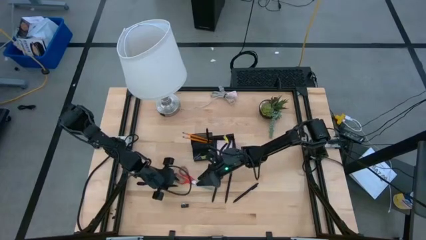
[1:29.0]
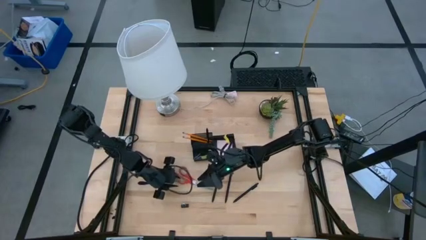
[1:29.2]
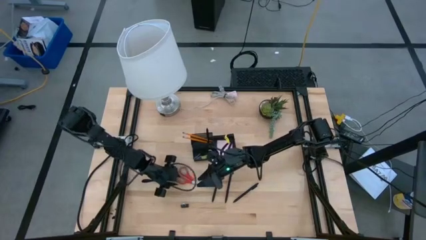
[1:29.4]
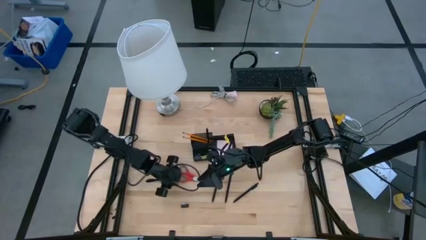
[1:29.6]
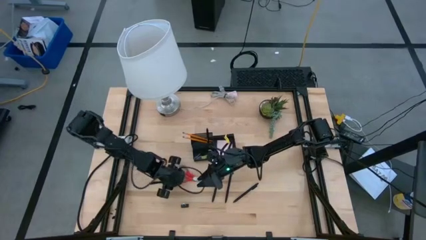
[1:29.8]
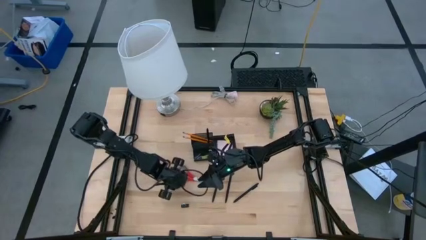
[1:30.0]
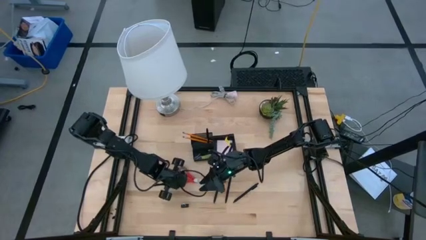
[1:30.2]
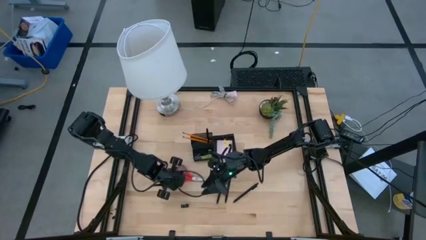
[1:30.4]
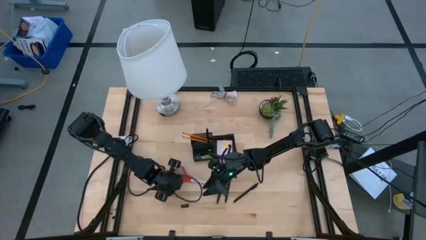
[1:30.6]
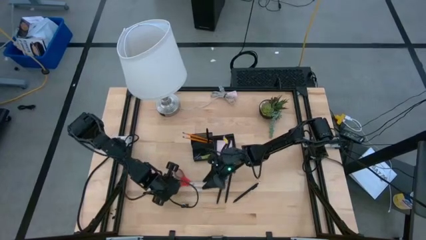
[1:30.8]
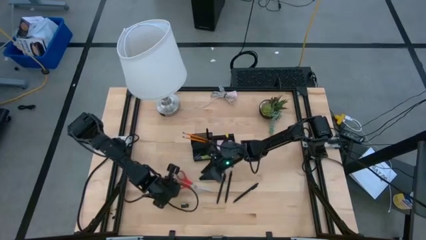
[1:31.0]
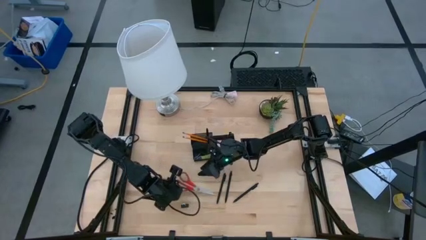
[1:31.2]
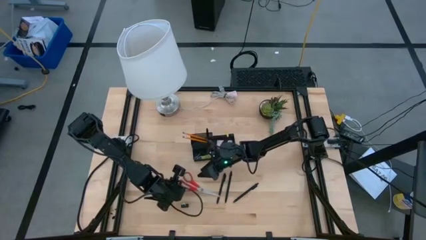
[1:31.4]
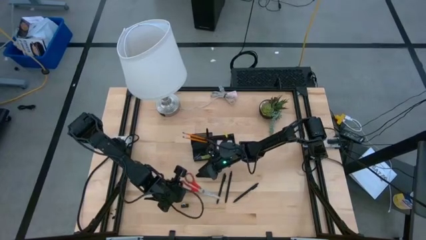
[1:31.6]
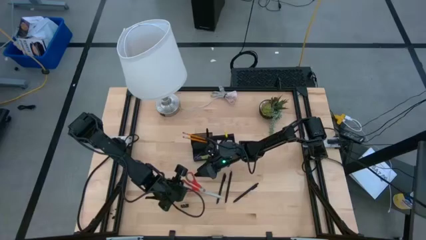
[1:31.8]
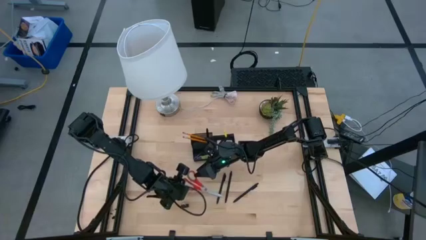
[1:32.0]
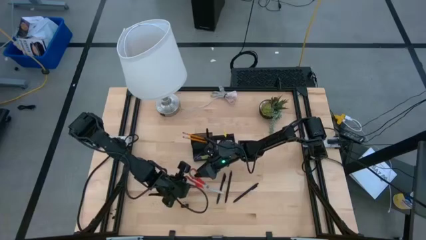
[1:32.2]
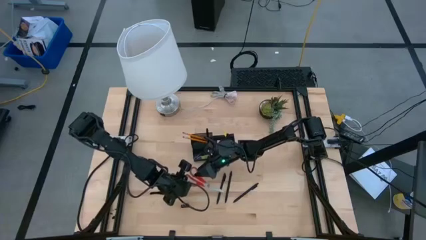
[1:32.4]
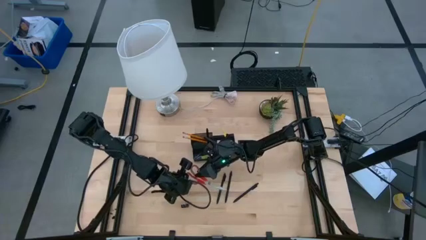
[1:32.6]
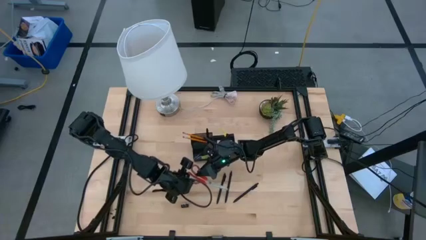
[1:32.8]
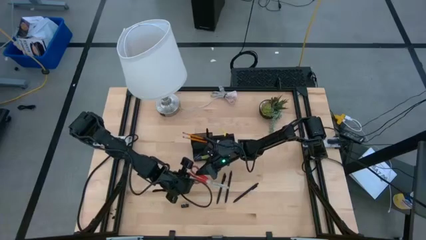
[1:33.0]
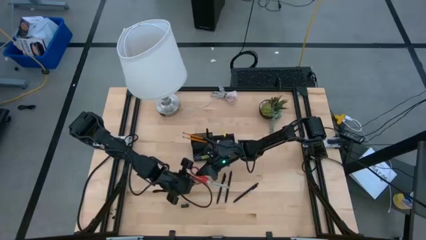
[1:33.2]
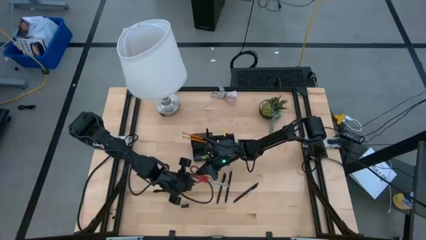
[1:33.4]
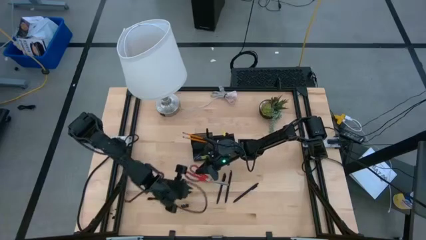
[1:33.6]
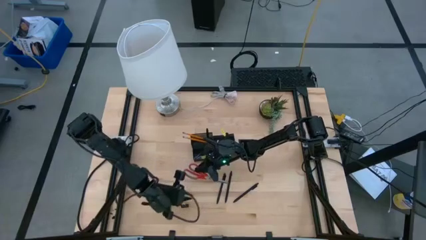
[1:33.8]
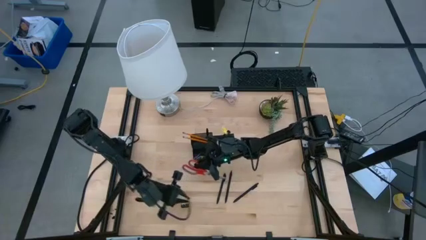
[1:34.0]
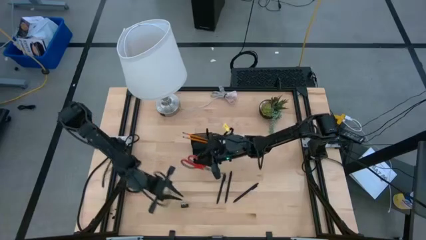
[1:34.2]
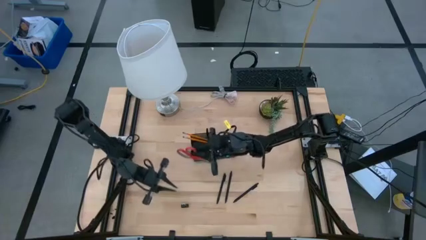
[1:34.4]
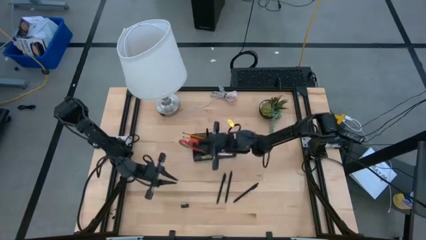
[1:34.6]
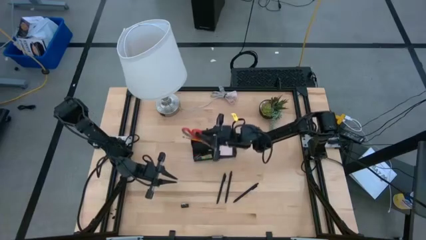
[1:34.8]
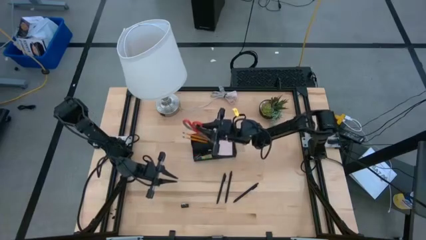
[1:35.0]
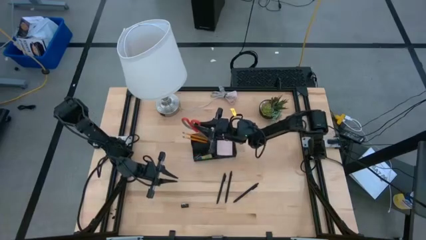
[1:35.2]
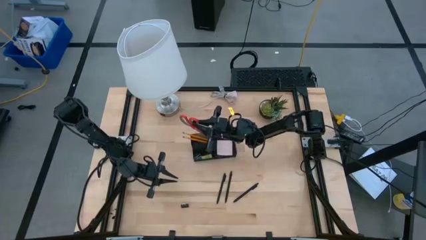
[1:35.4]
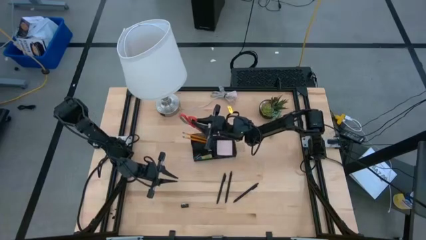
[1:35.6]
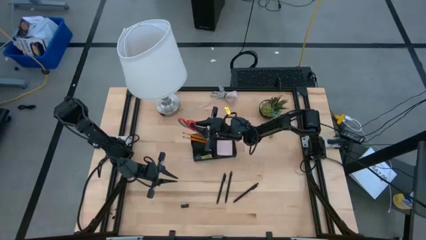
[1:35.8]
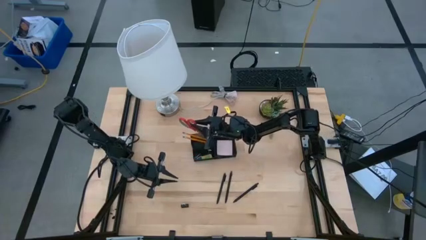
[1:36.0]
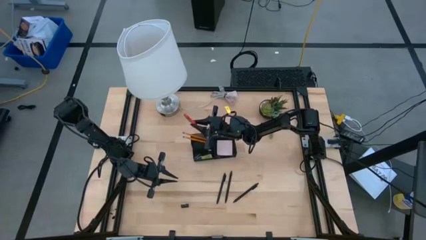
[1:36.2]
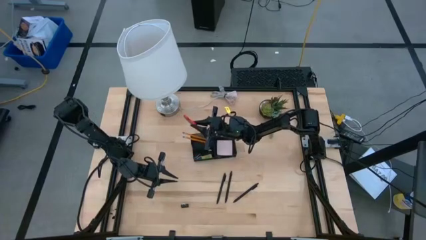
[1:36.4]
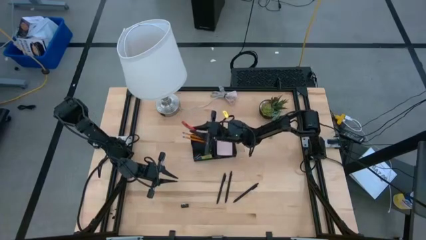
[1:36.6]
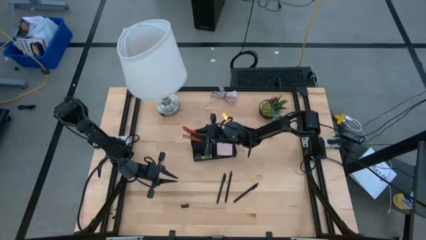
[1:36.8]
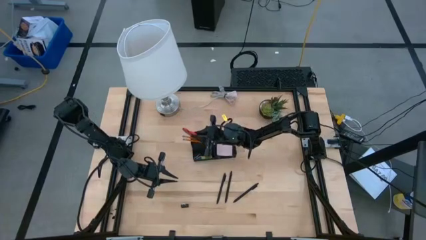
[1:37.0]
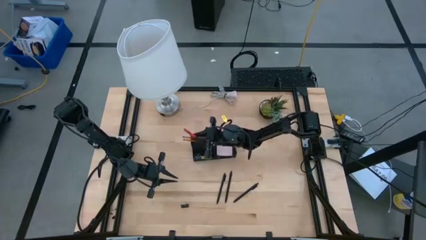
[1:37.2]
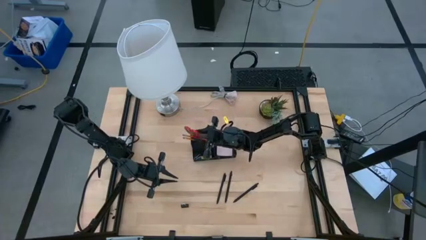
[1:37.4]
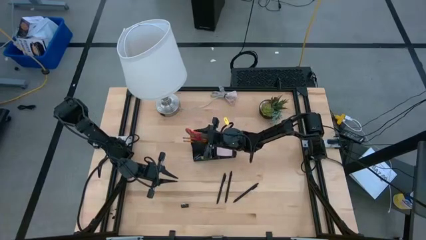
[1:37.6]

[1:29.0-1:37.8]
Task: Pick and place office supplies into organizer
Put the red scissors into the black desk organizer

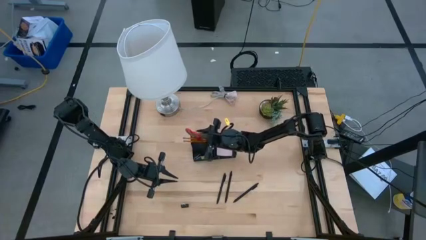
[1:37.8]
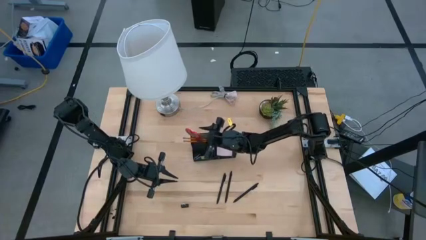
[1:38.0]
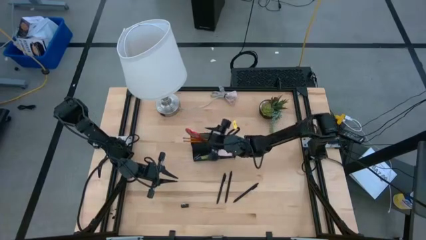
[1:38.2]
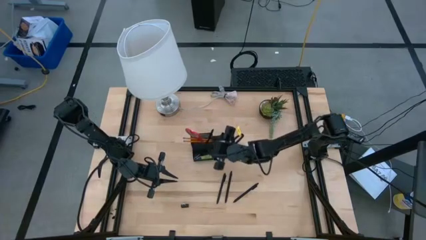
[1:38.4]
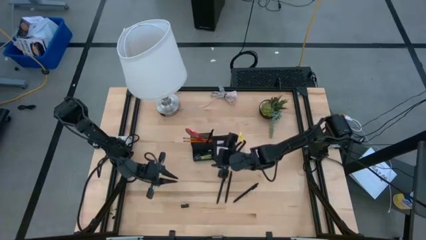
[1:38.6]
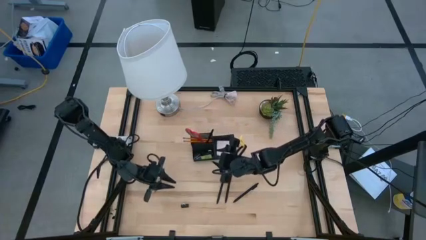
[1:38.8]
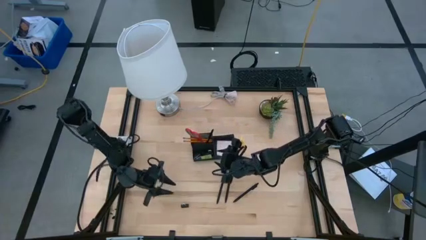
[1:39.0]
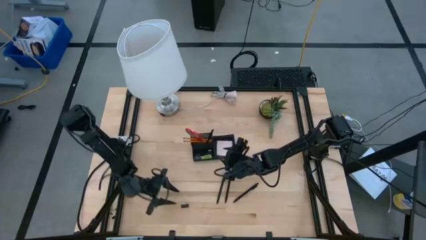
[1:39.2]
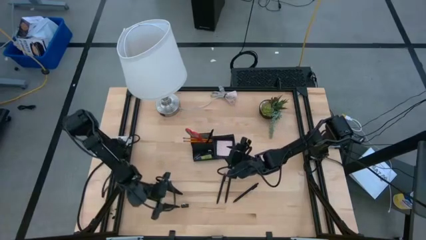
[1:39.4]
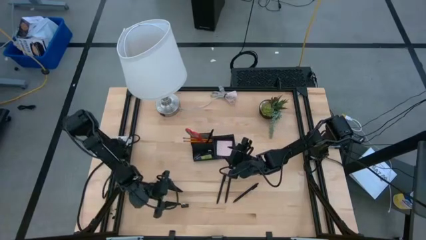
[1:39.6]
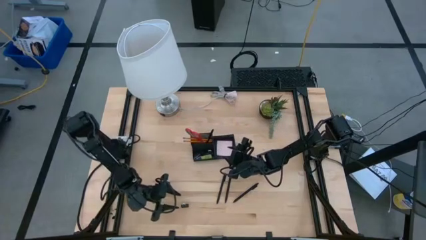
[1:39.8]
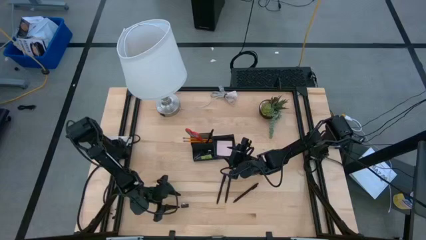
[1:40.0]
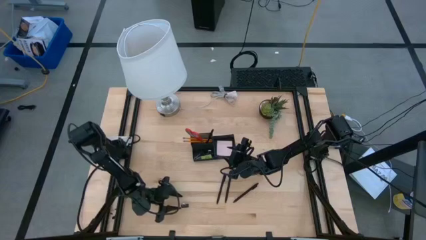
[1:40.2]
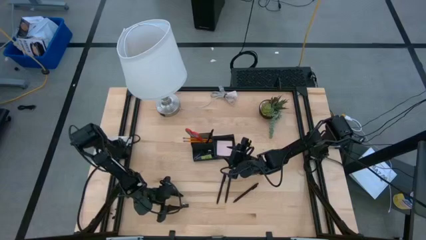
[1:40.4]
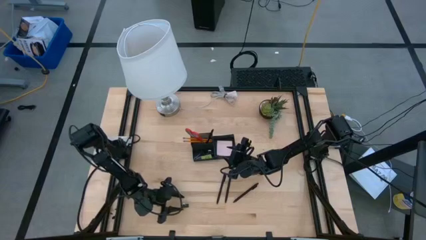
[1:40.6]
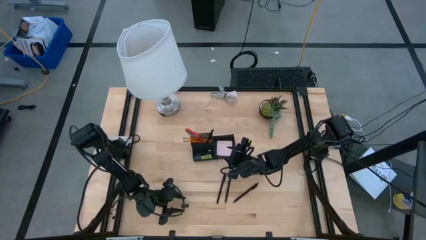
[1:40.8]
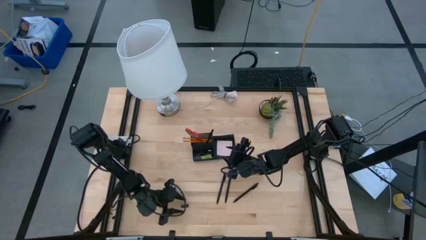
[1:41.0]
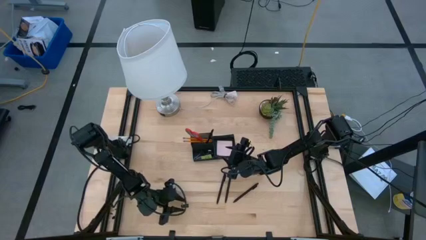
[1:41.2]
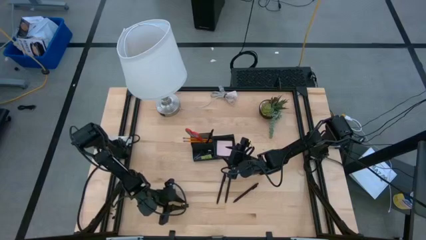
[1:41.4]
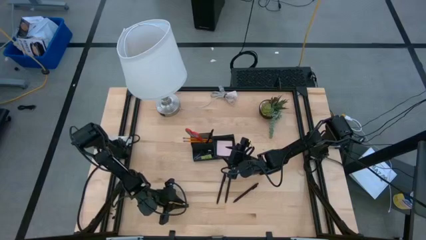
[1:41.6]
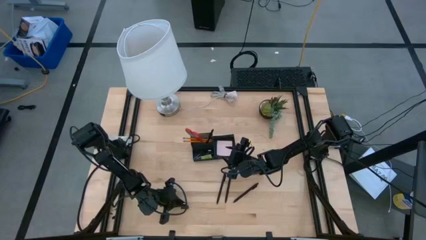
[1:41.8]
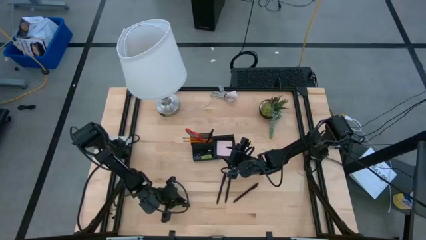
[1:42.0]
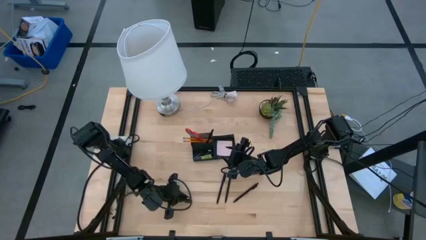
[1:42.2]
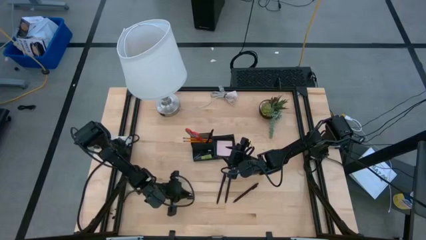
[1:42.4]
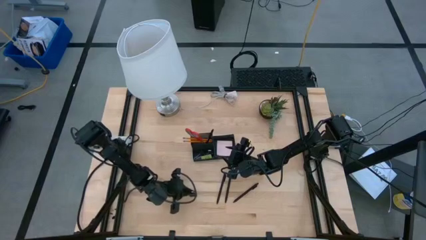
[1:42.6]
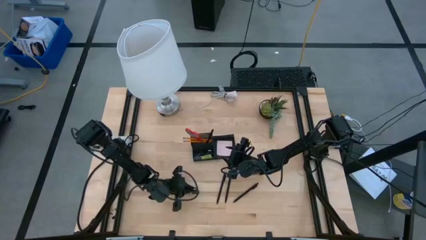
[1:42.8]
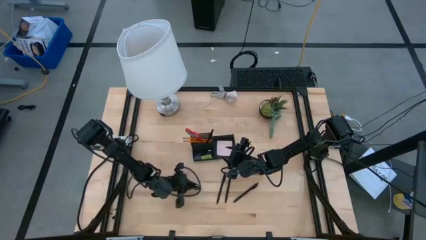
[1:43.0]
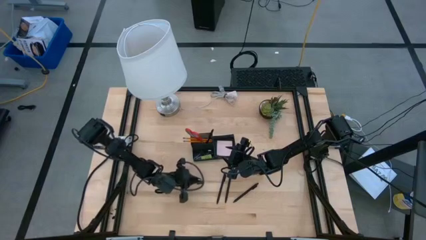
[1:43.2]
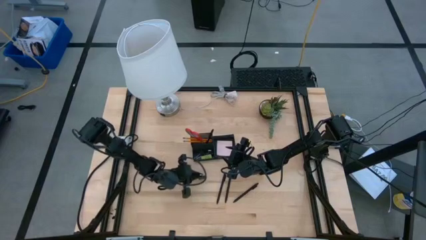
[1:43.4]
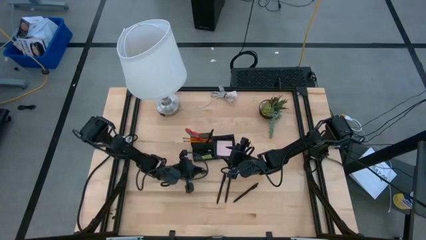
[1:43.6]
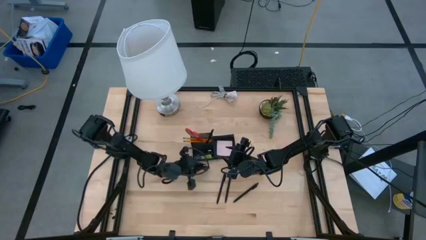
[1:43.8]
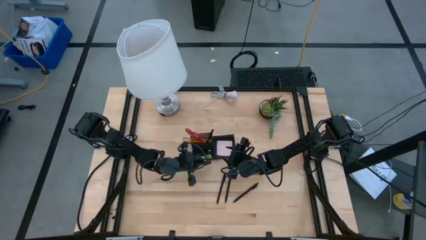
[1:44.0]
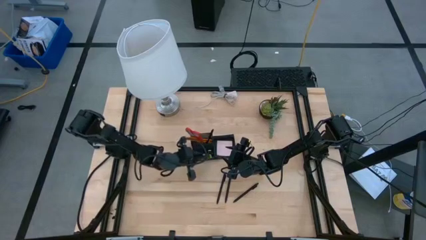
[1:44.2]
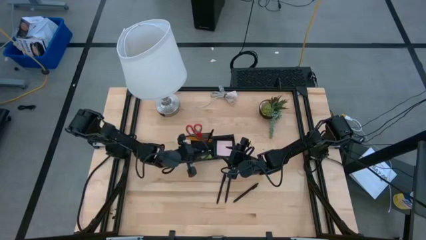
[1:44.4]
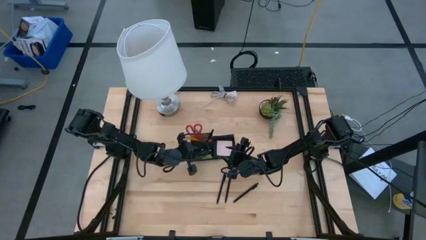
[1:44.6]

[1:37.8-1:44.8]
Put the black binder clip into the black desk organizer
